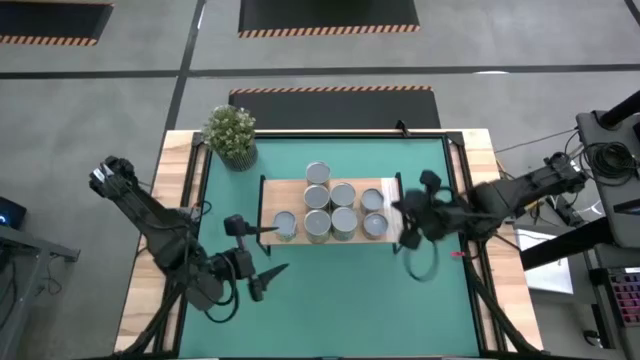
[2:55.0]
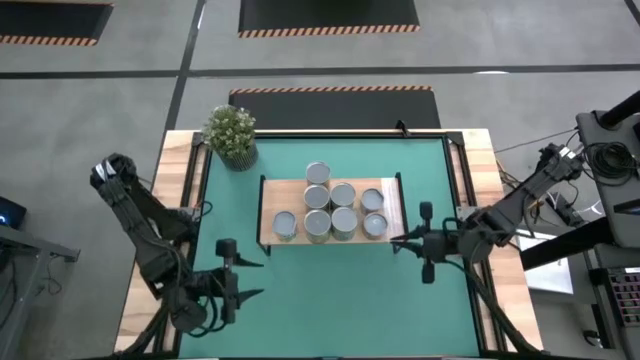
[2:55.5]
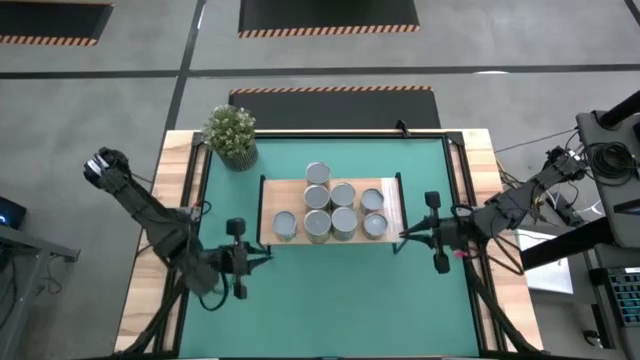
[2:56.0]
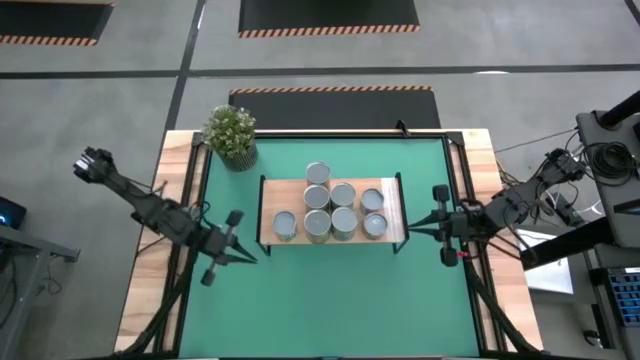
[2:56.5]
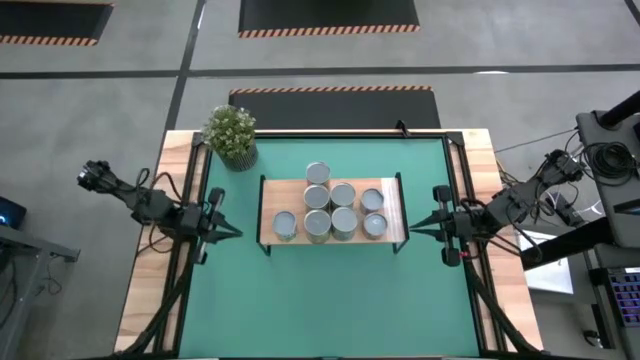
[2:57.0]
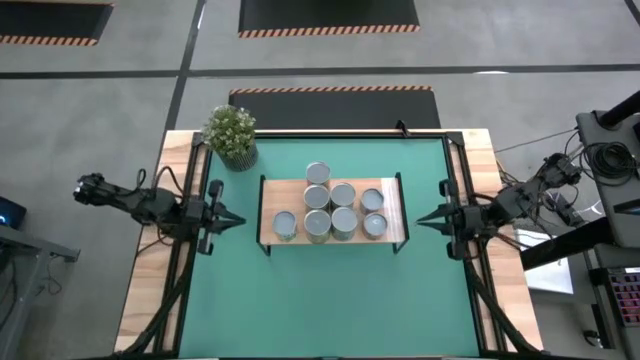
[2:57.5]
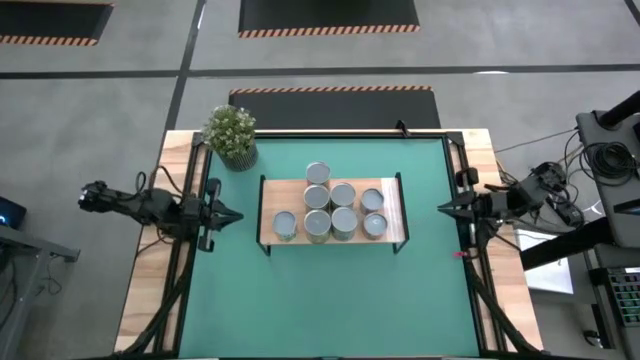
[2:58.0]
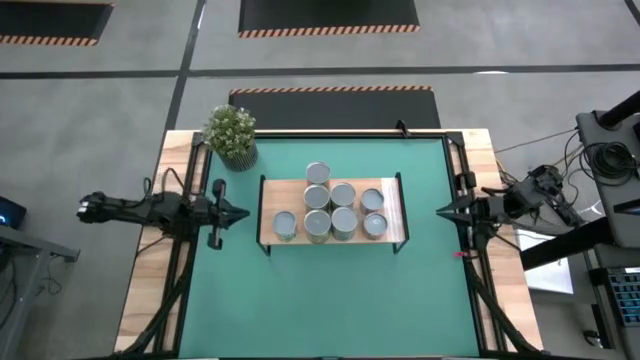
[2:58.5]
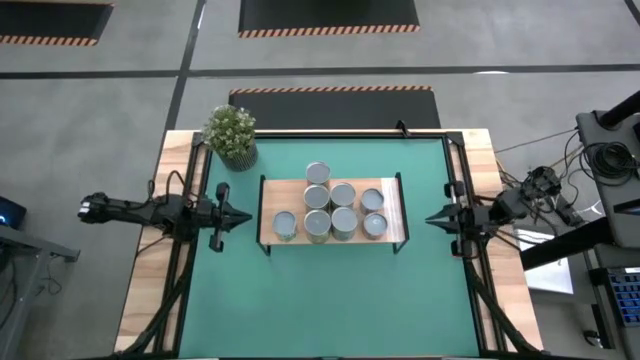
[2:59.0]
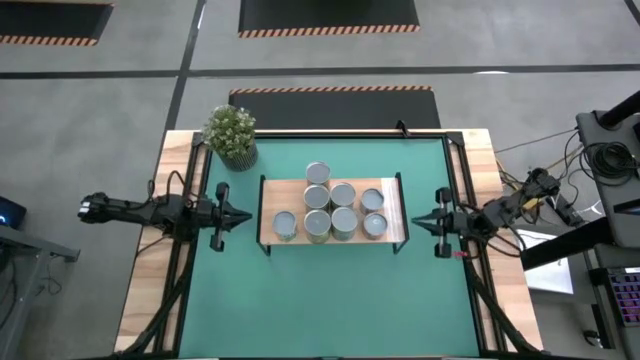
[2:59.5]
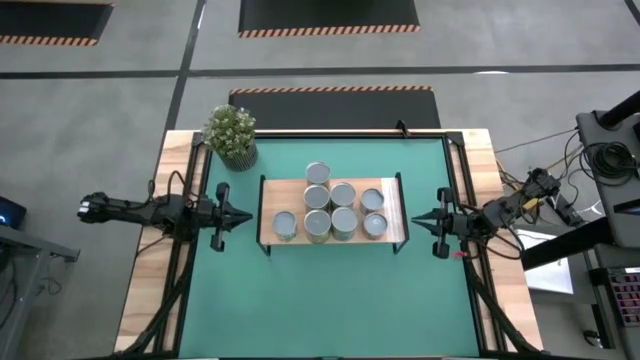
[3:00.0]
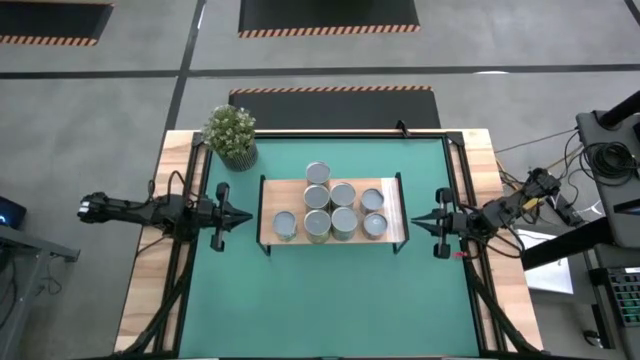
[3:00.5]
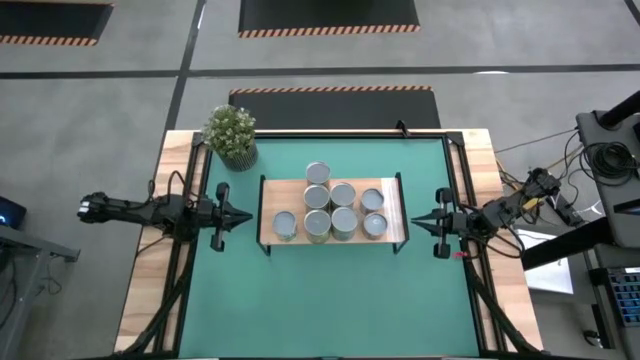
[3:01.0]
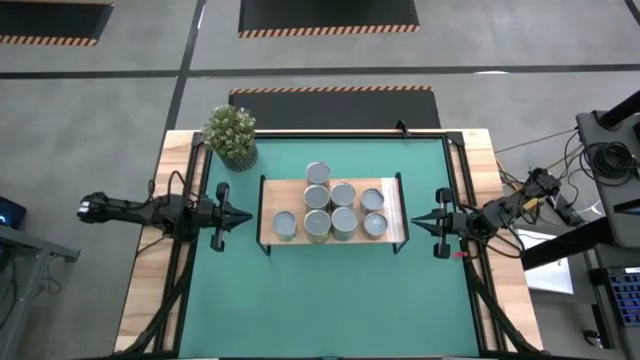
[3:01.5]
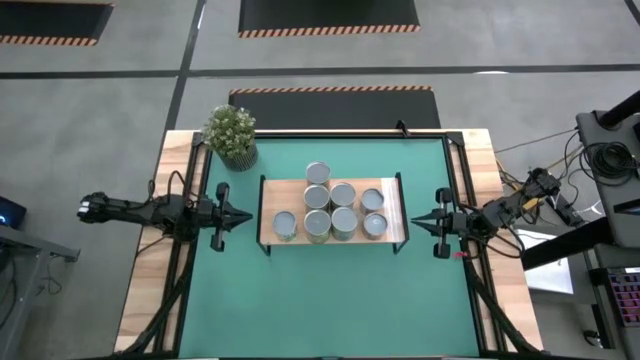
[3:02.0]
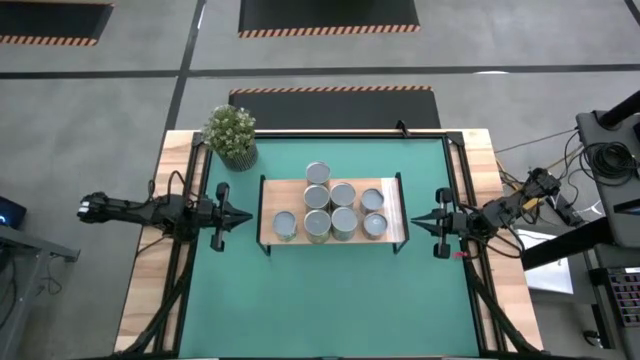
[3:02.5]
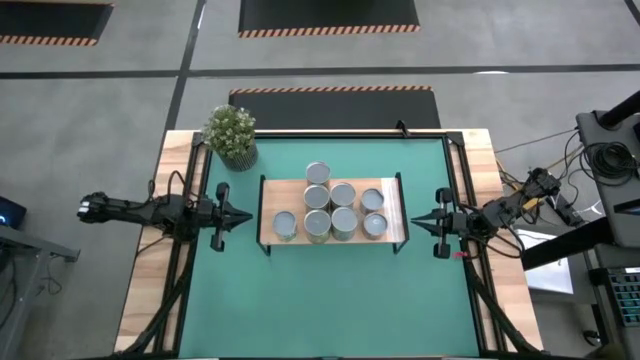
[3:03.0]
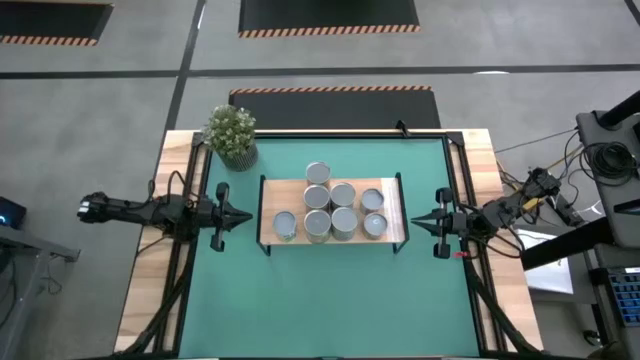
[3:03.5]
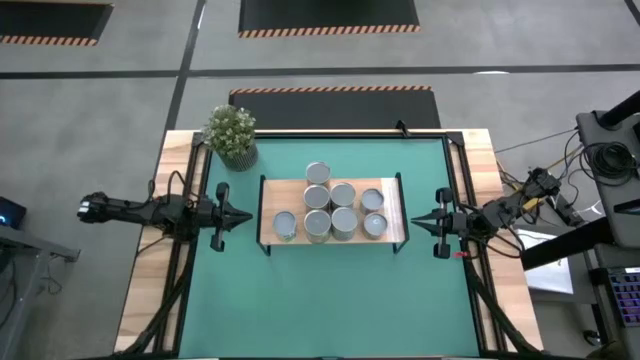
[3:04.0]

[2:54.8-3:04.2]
Task: Pick and place cans onto a shelf
Return to Home Position

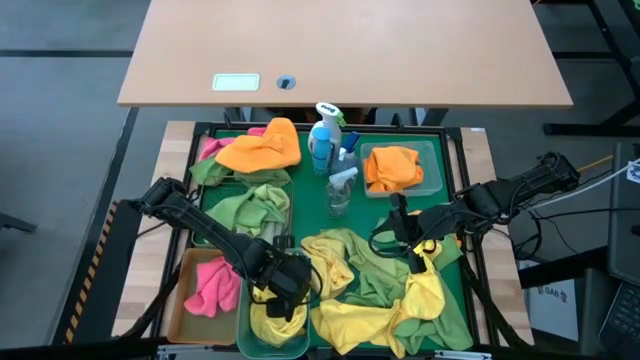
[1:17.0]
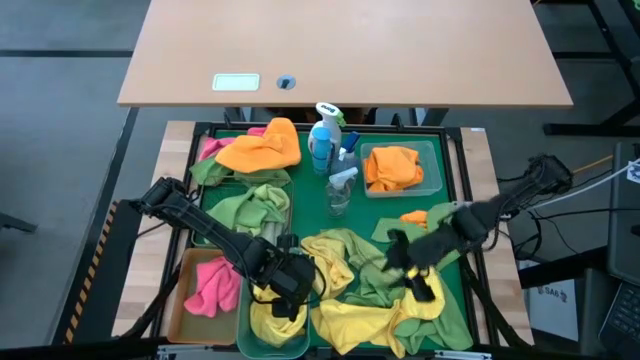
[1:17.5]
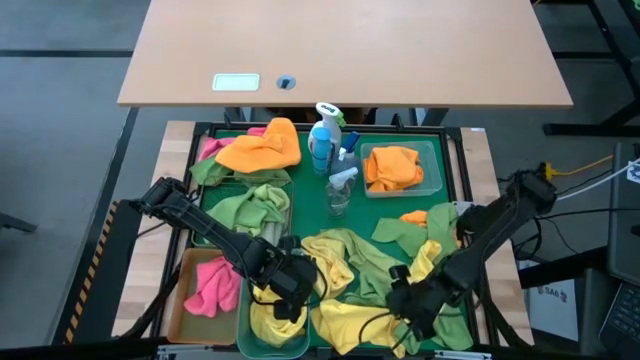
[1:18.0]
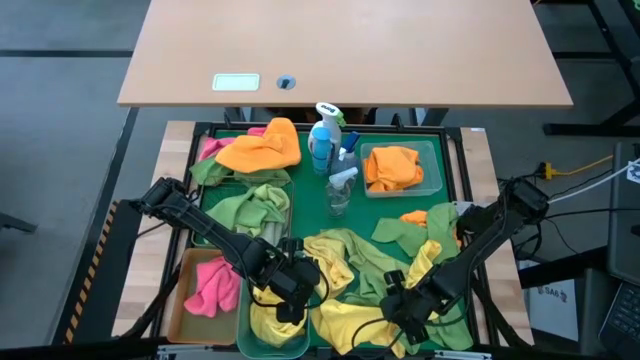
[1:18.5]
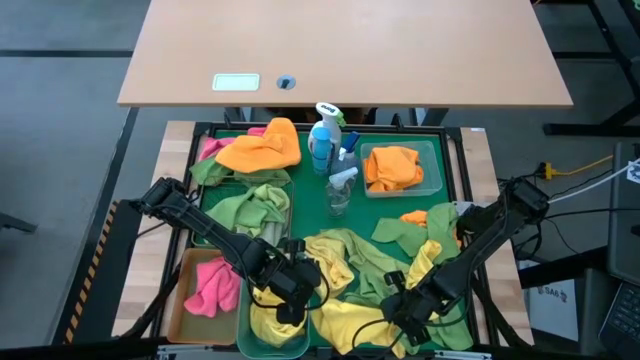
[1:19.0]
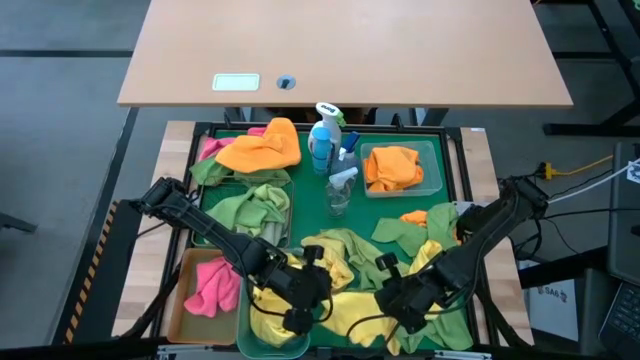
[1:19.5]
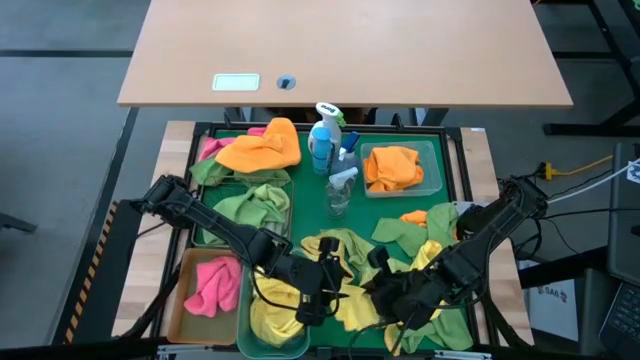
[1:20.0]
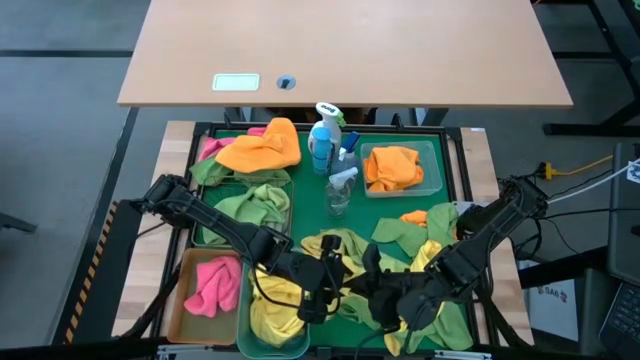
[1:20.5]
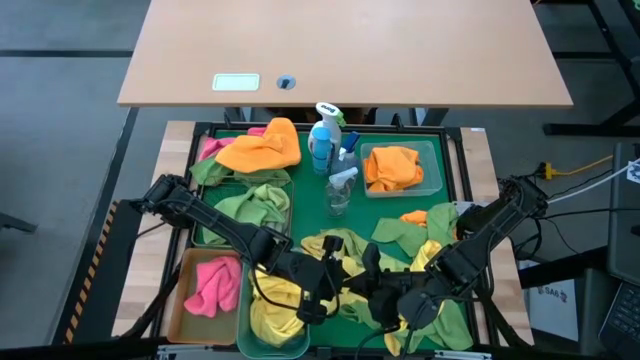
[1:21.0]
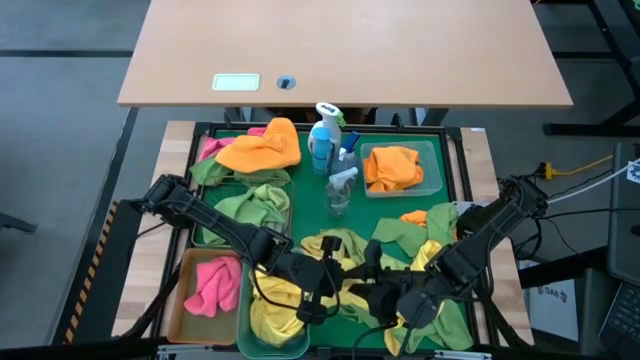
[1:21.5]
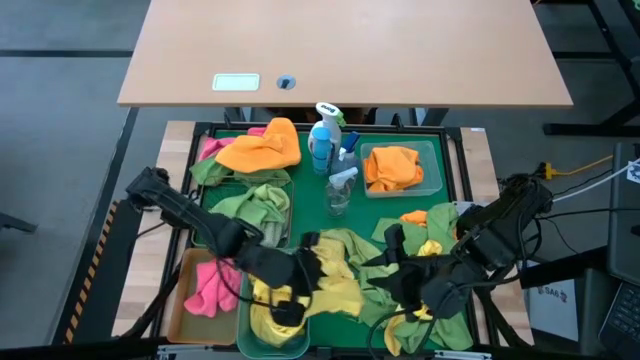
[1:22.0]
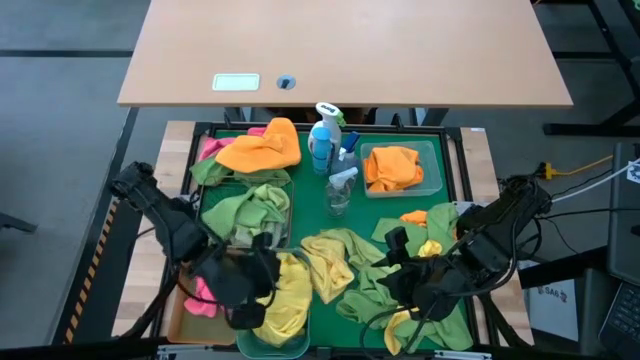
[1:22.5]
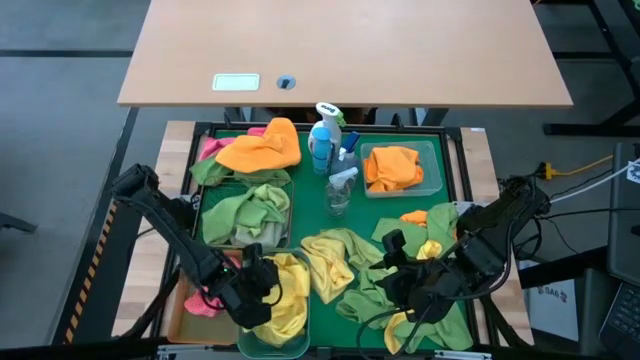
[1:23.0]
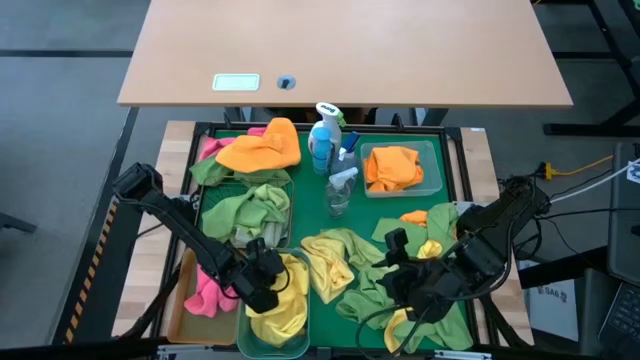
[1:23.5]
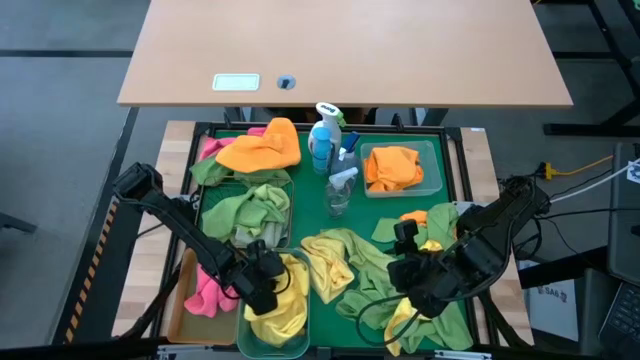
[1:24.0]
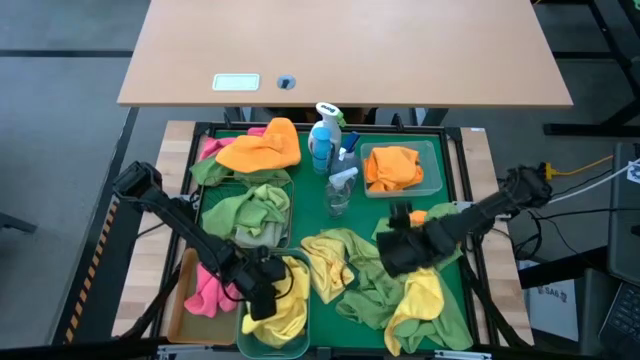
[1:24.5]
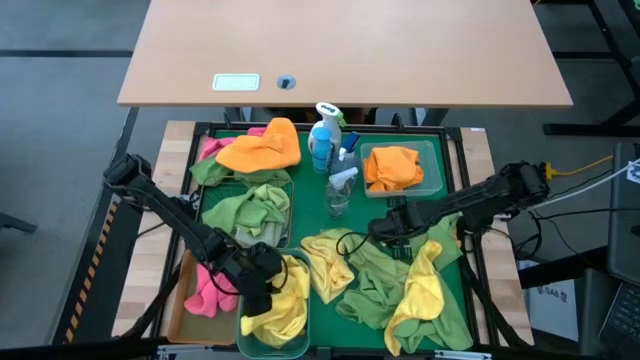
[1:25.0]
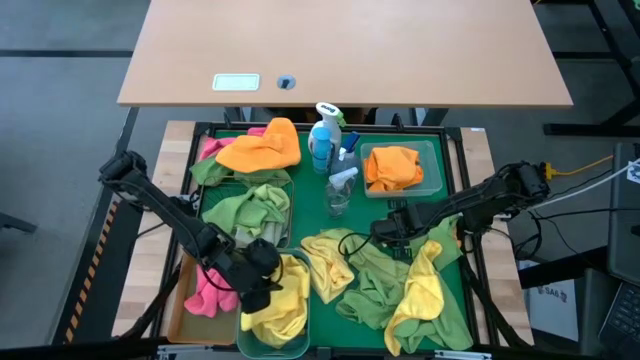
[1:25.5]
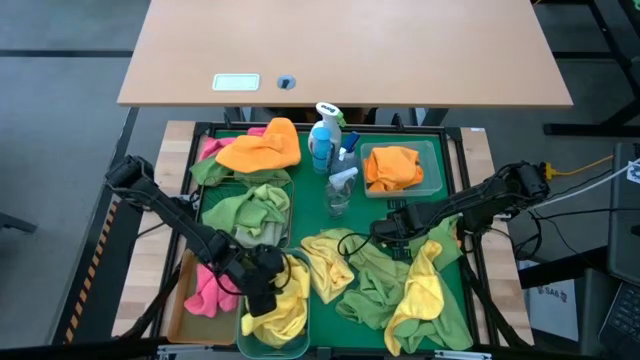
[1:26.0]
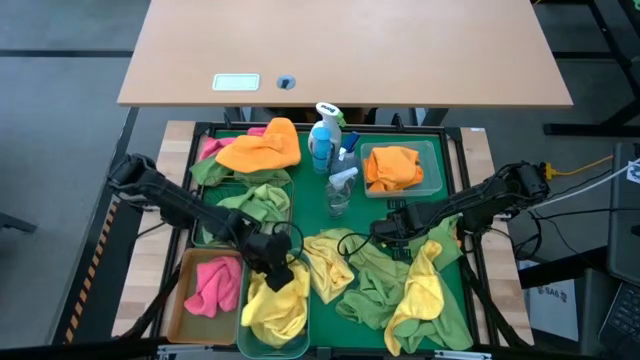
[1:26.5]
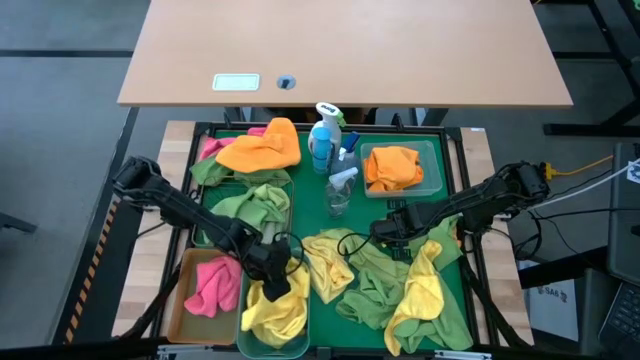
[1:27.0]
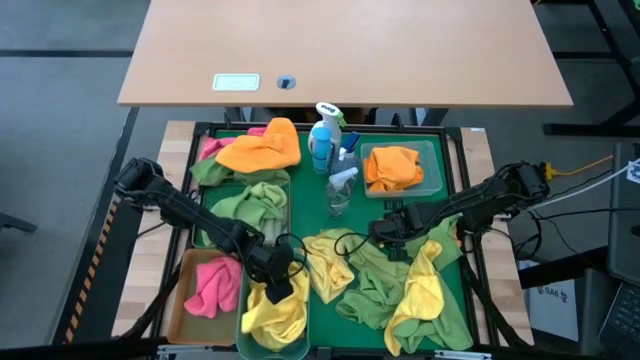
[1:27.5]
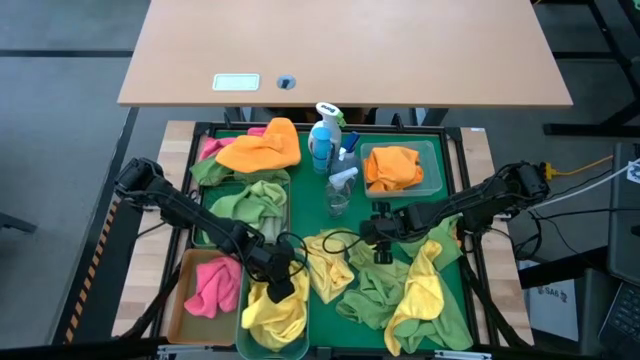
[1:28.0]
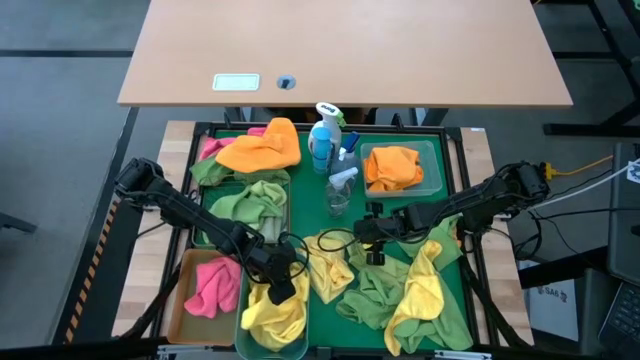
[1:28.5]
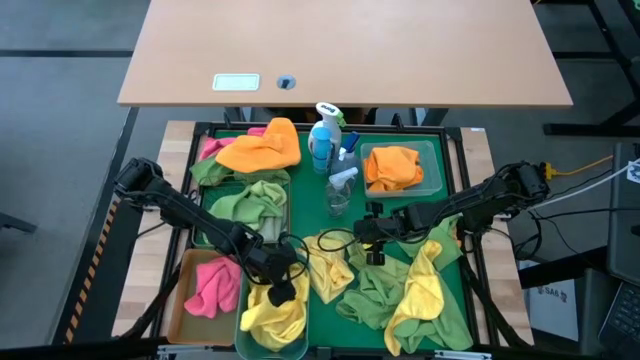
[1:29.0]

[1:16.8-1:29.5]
Task: Sort microfiber towel by color & place in baskets
Put the yellow towel into the blue bin
